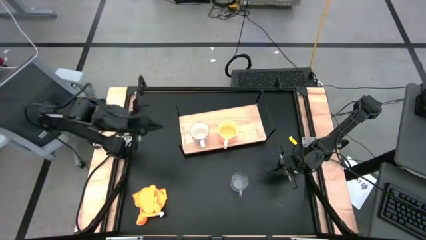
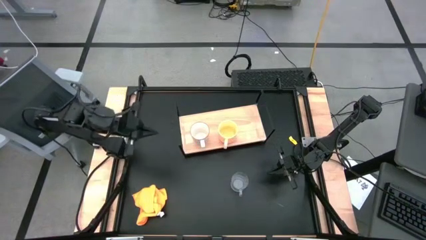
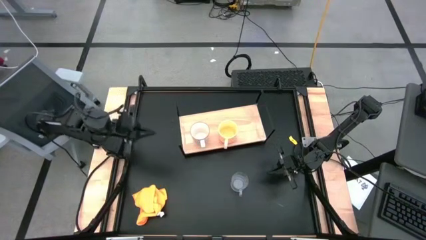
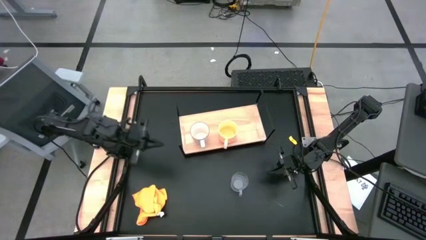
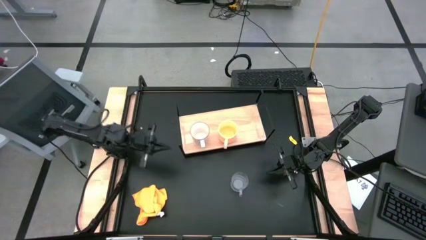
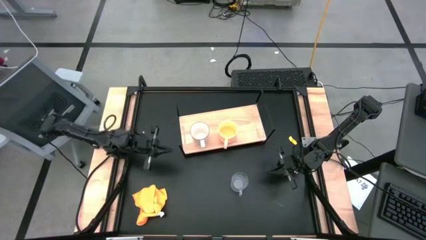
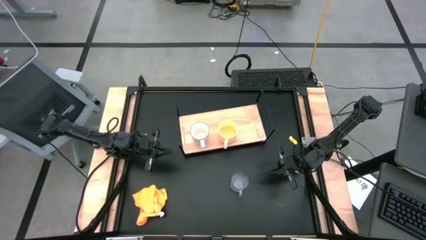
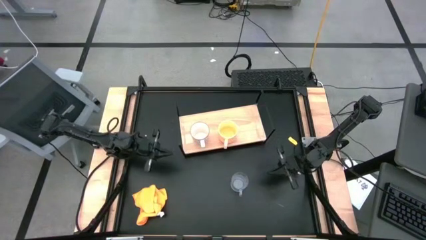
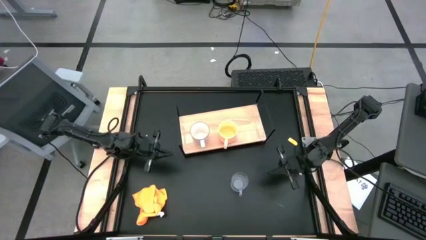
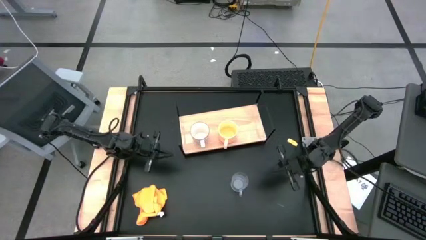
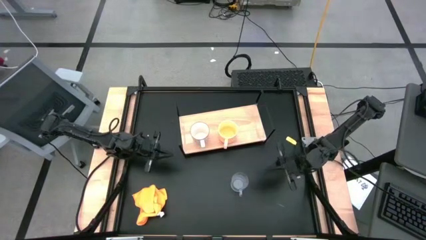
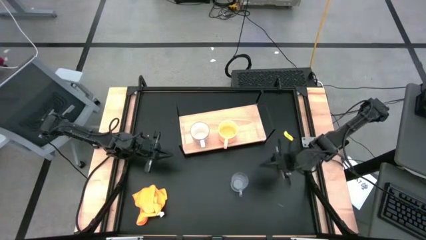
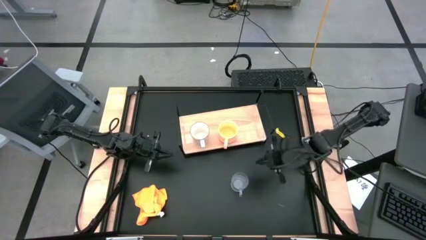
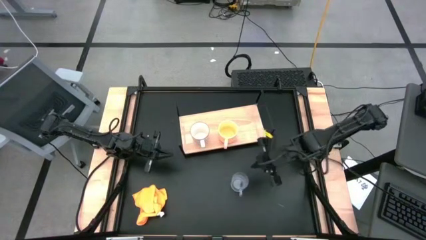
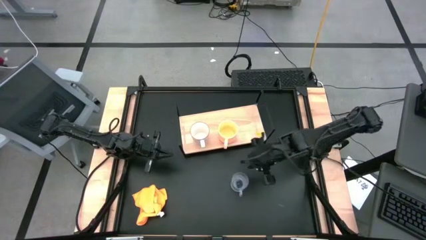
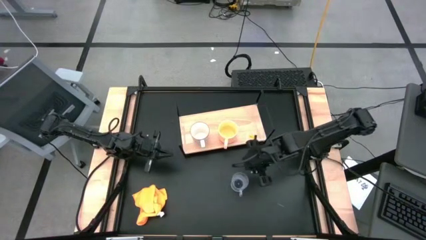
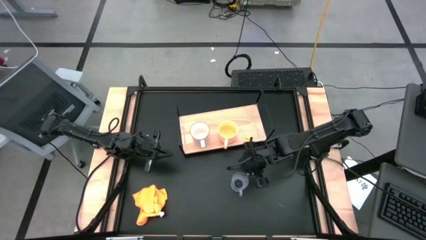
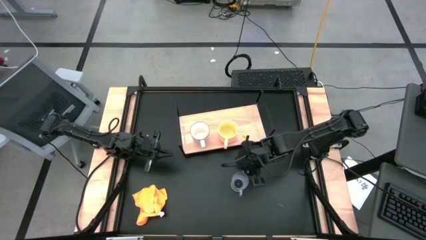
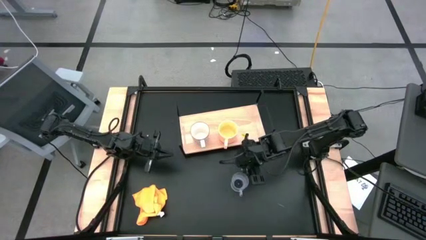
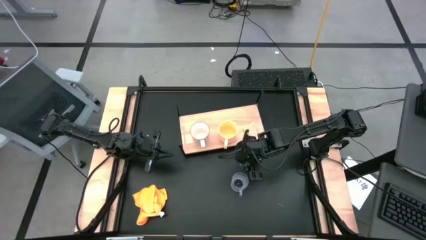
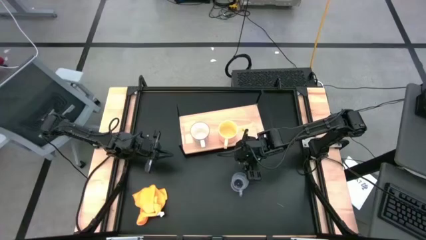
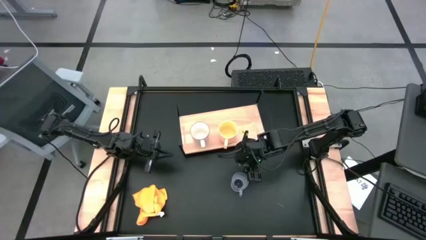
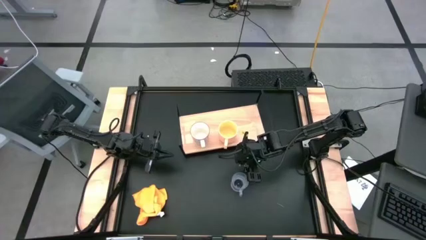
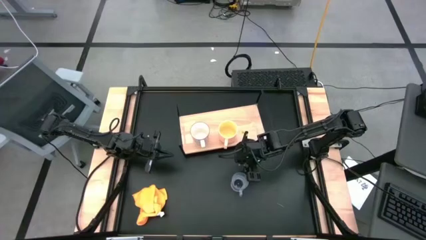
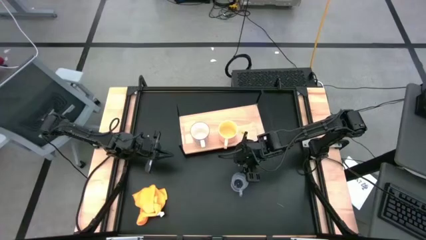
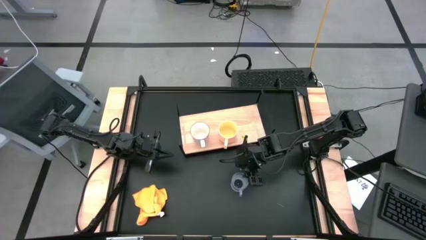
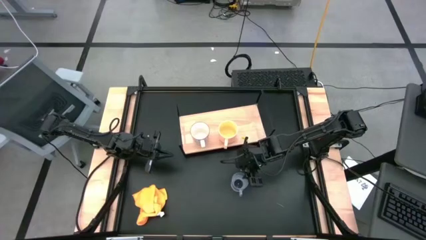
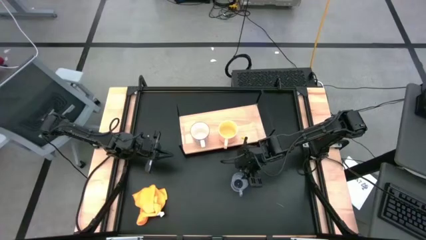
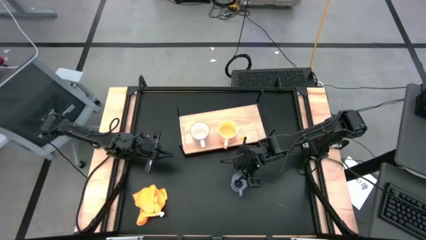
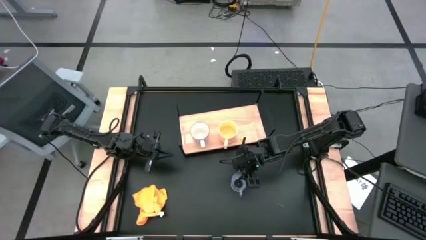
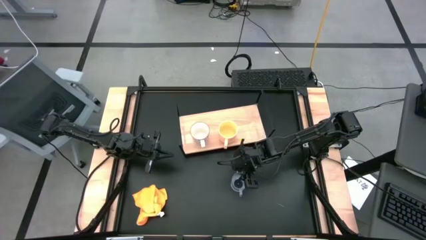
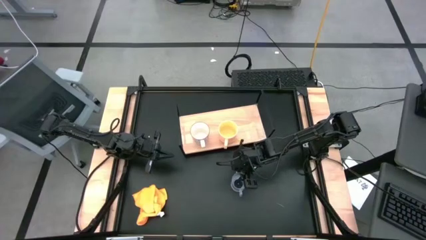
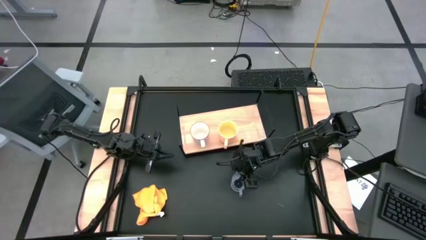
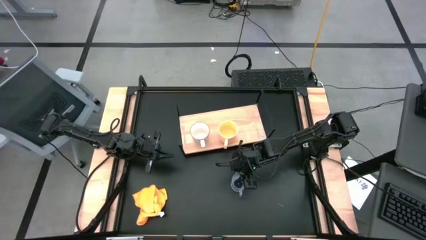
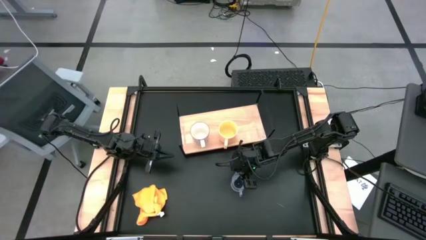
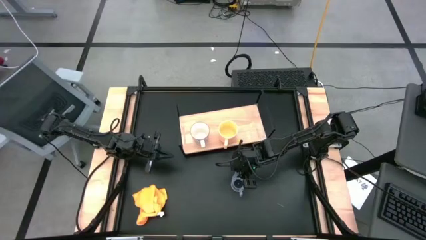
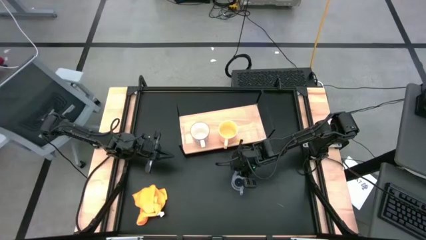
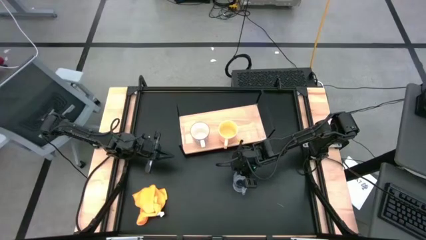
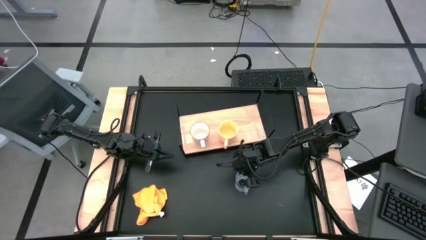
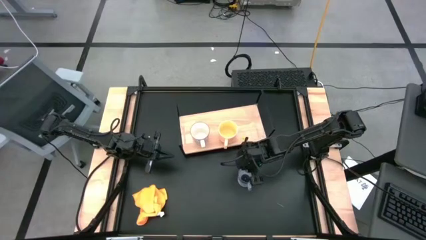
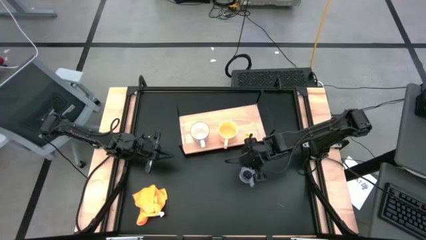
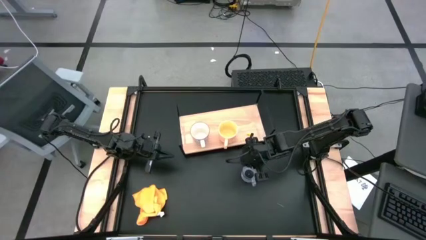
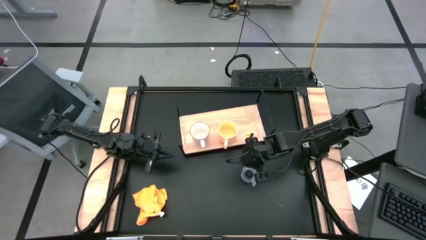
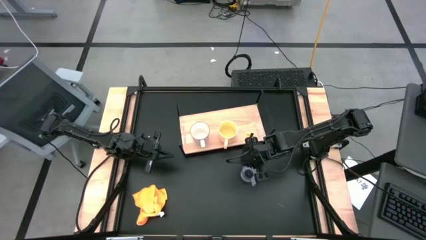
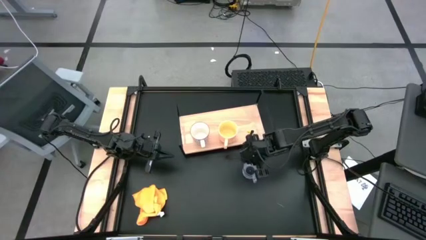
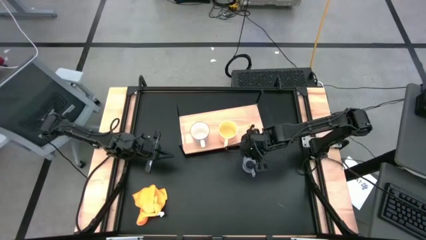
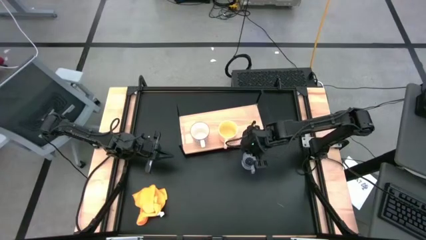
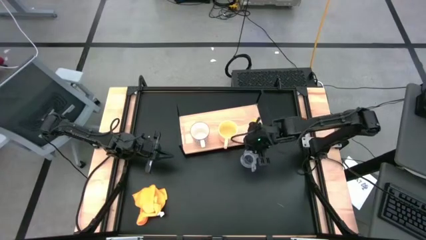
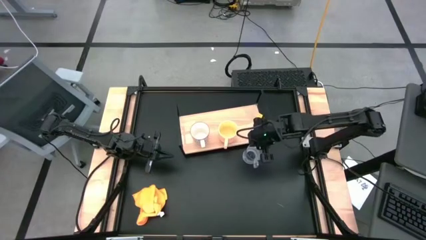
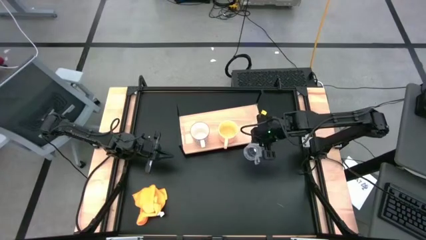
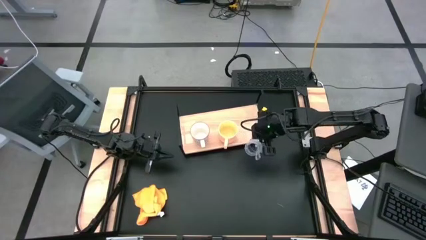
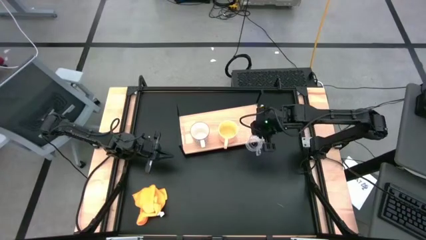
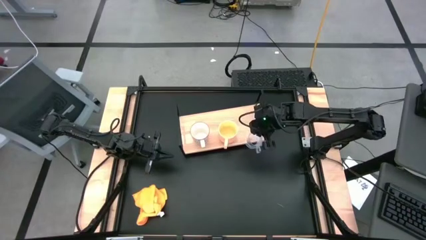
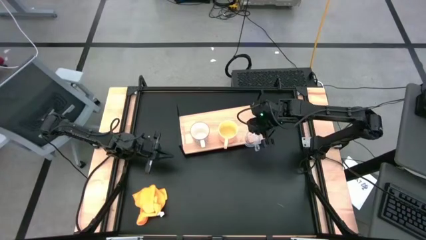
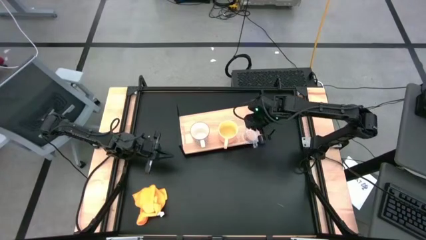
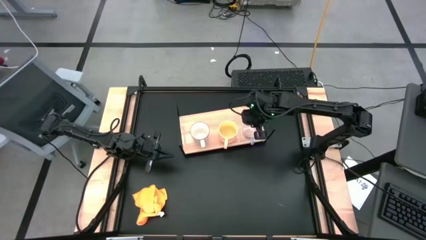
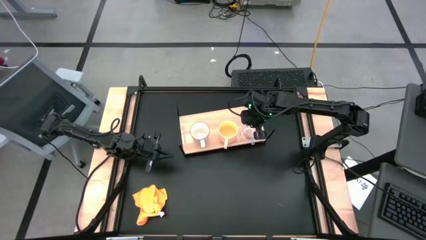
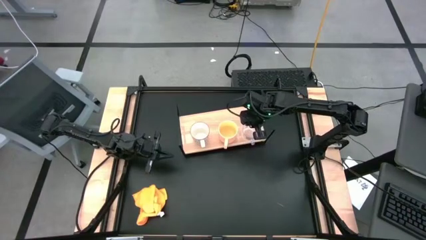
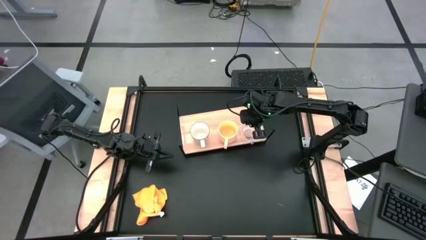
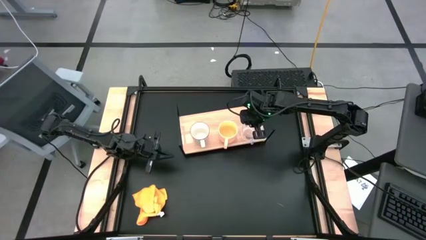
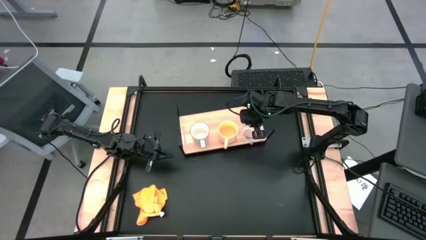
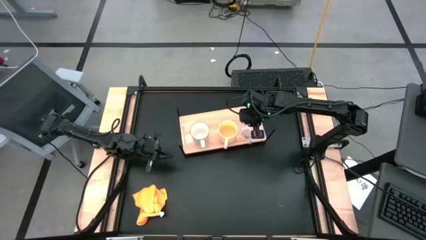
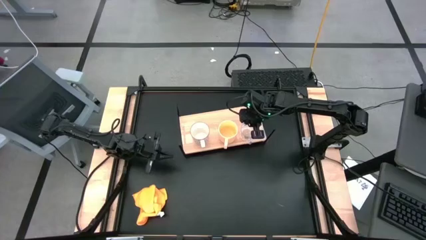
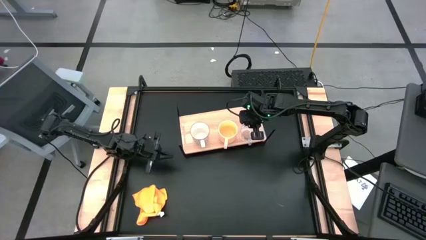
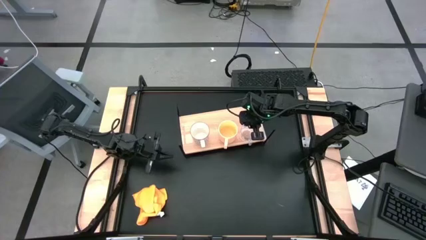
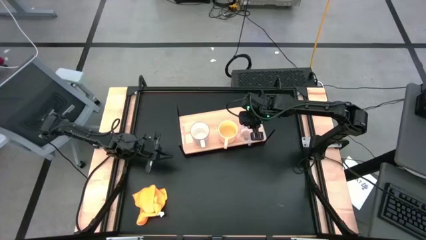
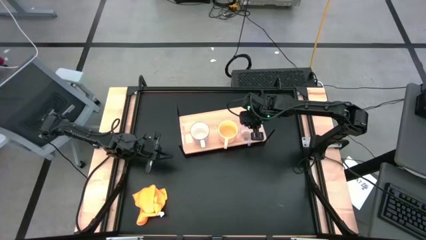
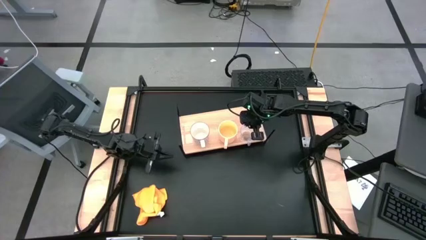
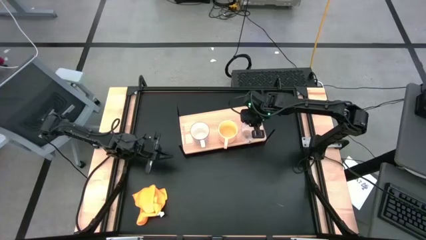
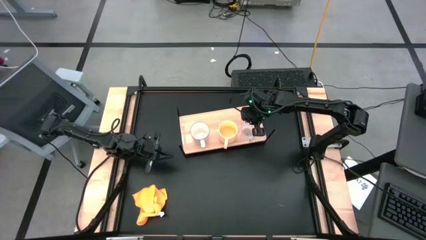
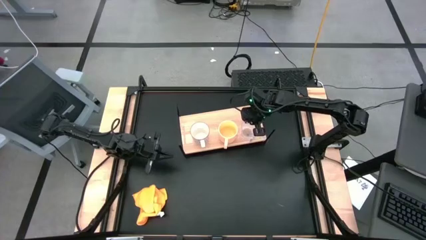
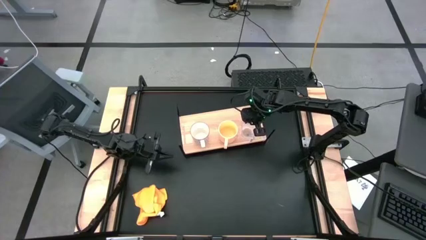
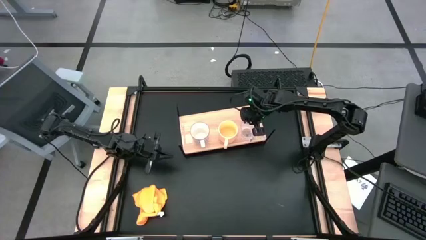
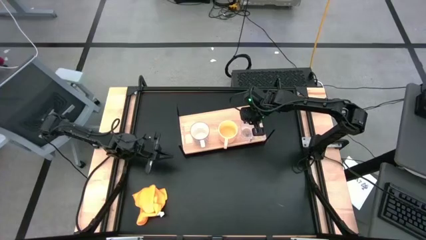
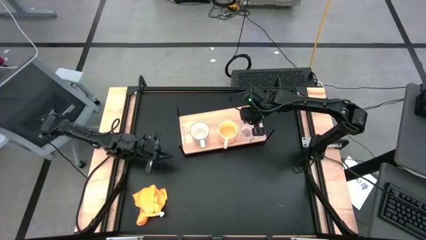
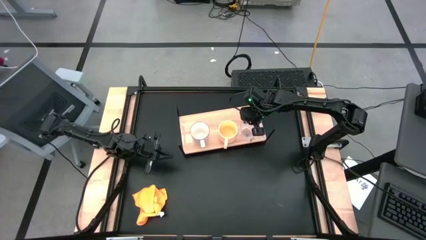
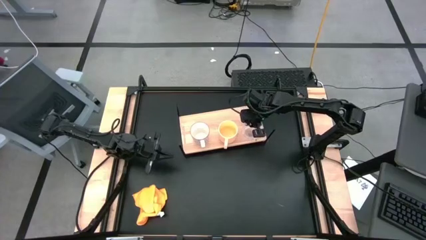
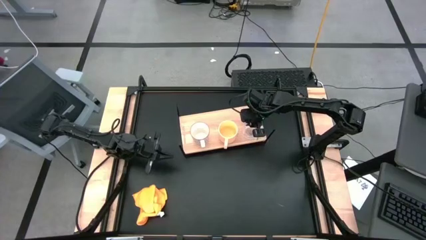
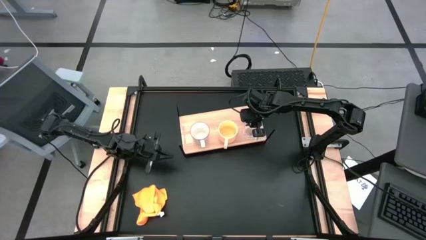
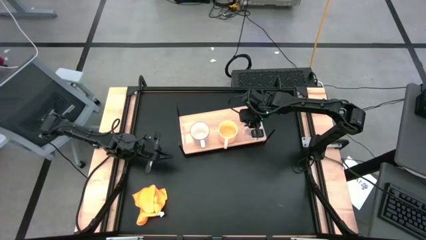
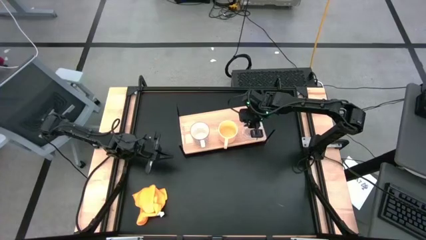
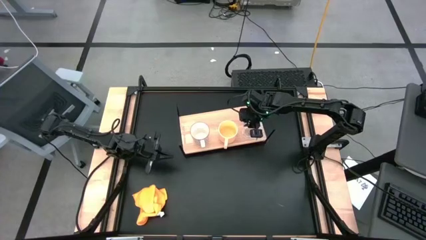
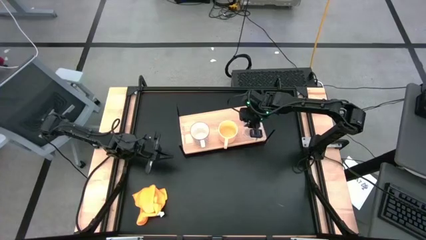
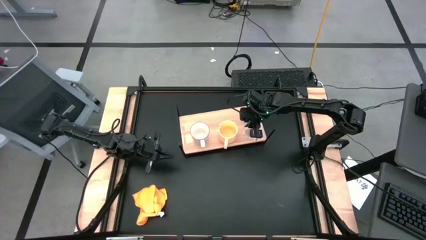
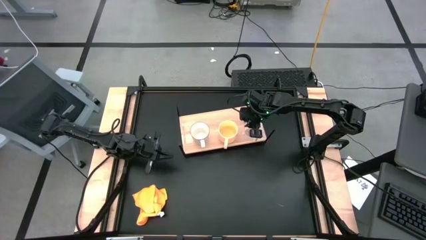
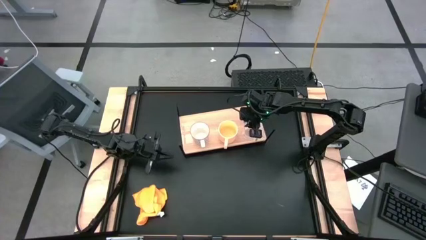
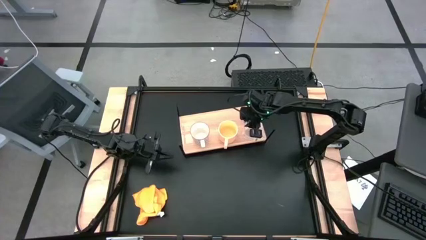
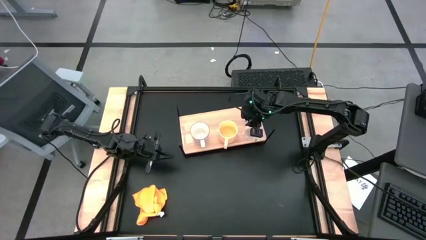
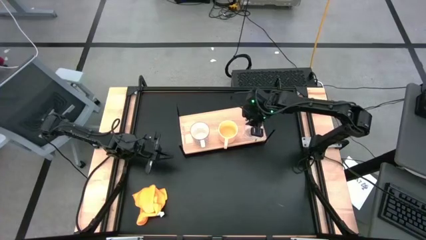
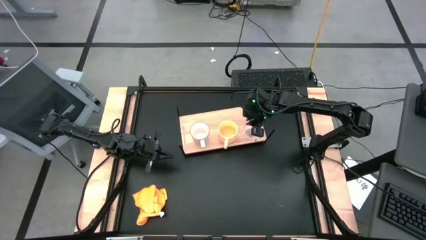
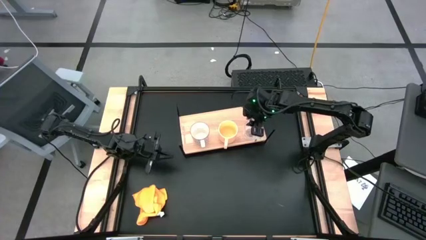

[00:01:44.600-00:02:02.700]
Task: Stack small to large cups/mugs on shelf
Put the transparent mug on the shelf
